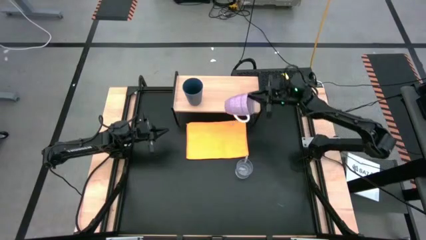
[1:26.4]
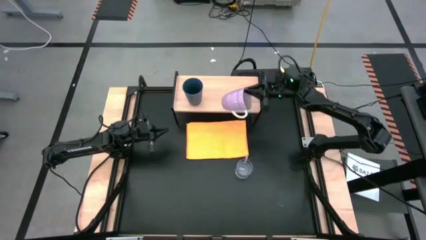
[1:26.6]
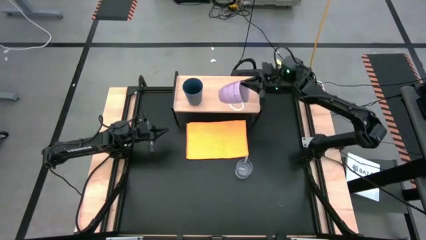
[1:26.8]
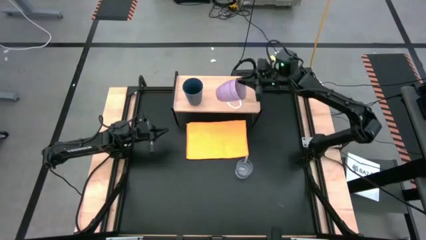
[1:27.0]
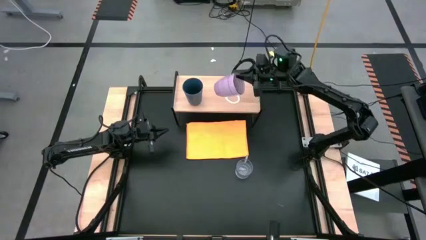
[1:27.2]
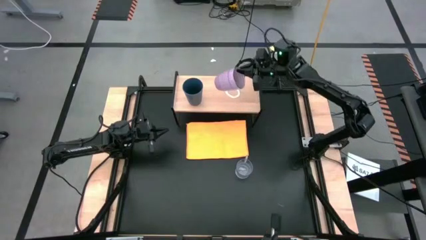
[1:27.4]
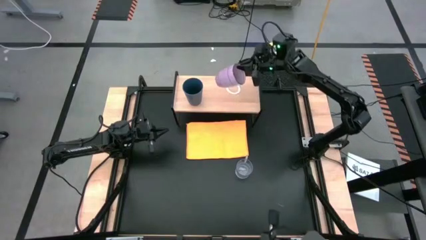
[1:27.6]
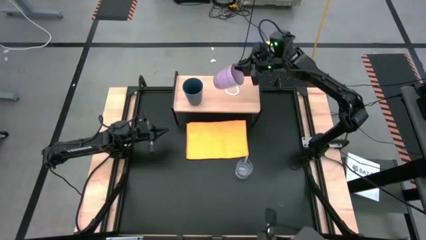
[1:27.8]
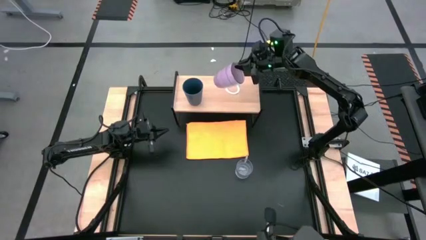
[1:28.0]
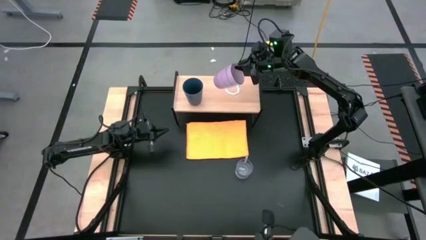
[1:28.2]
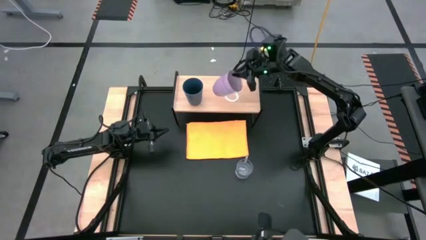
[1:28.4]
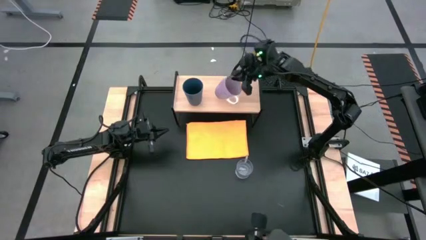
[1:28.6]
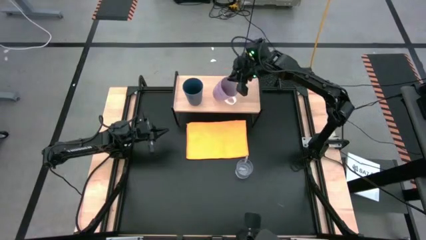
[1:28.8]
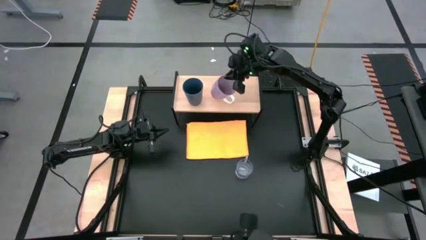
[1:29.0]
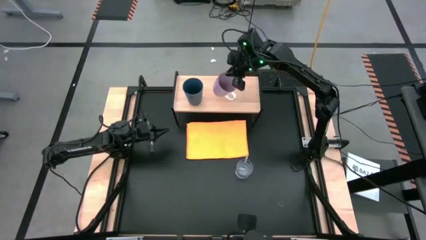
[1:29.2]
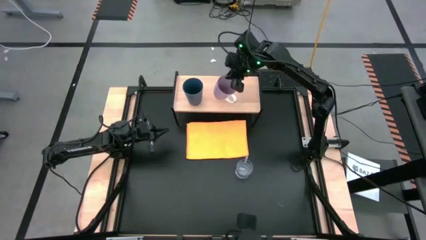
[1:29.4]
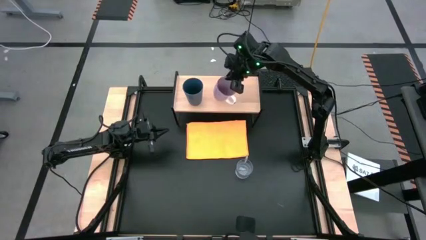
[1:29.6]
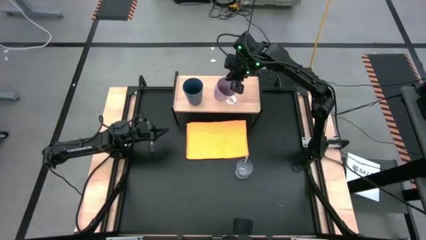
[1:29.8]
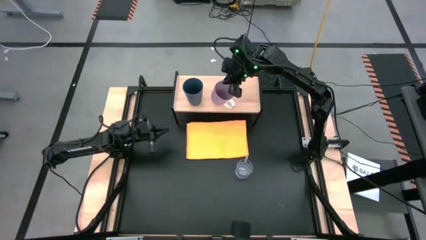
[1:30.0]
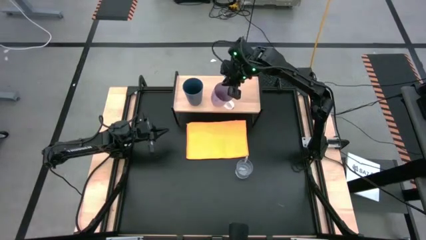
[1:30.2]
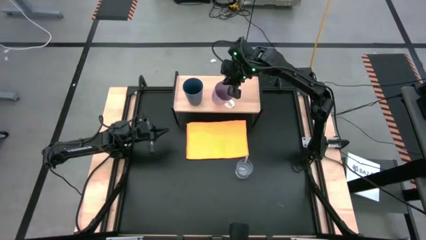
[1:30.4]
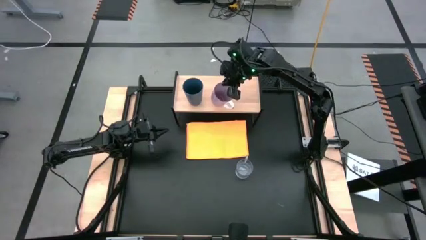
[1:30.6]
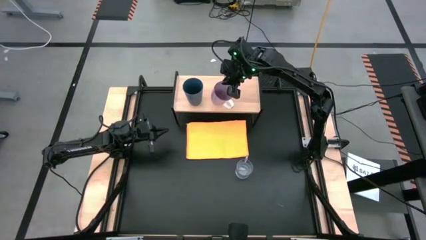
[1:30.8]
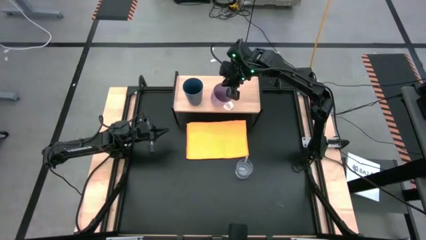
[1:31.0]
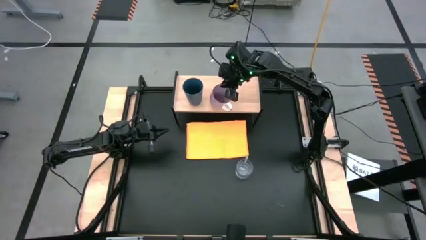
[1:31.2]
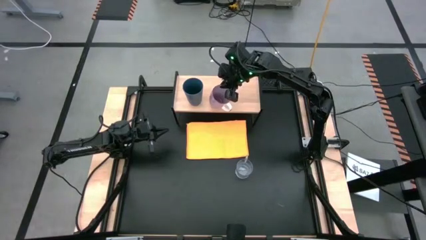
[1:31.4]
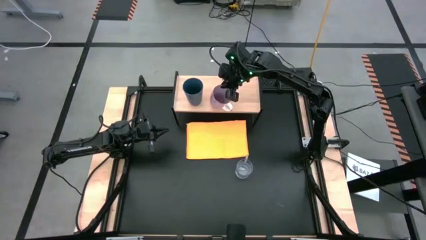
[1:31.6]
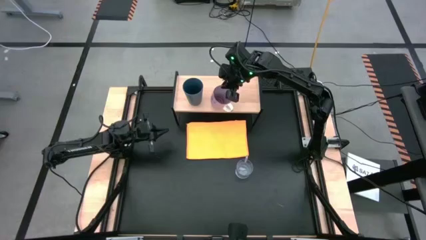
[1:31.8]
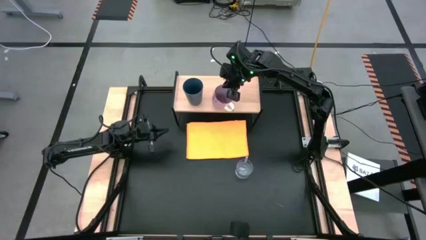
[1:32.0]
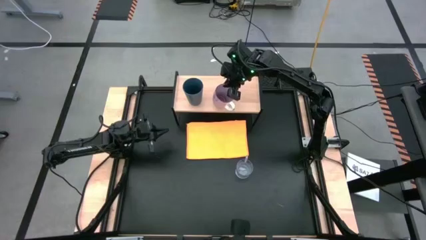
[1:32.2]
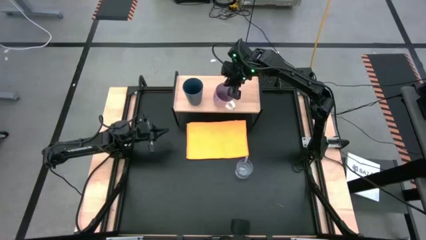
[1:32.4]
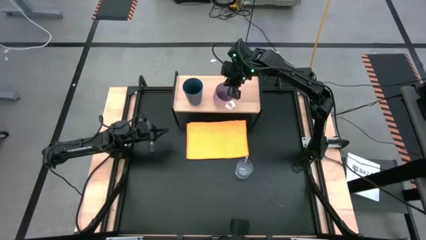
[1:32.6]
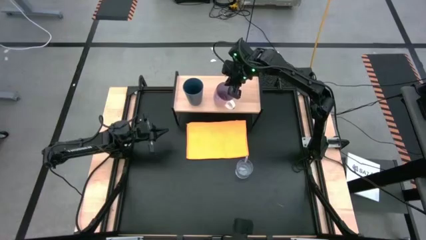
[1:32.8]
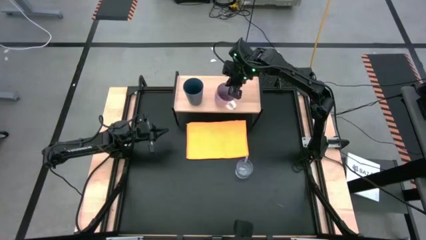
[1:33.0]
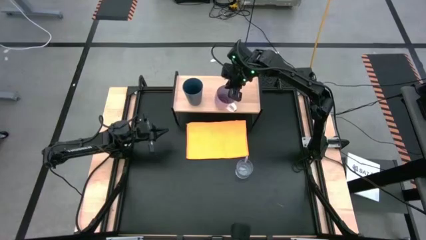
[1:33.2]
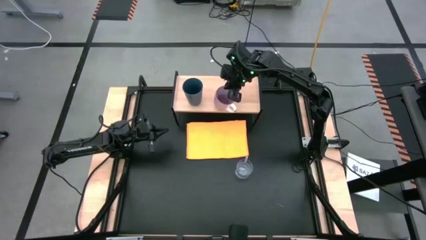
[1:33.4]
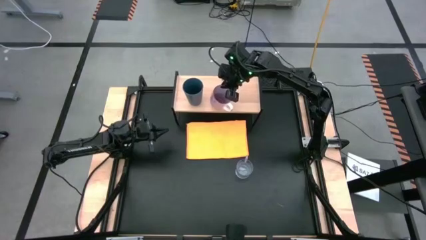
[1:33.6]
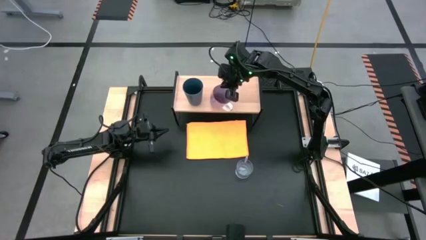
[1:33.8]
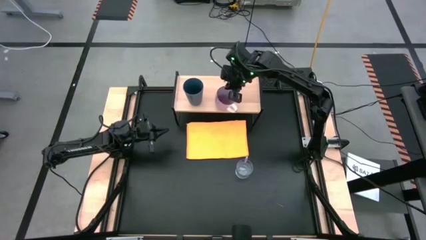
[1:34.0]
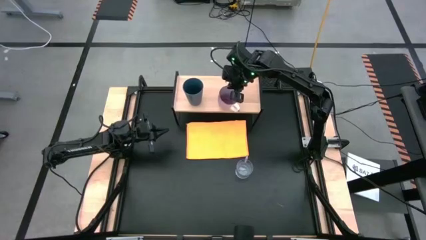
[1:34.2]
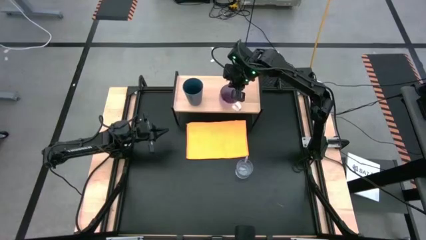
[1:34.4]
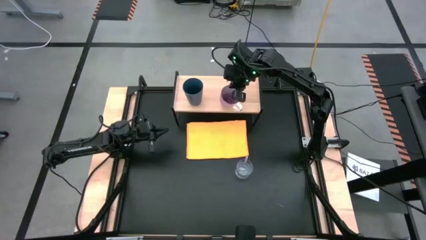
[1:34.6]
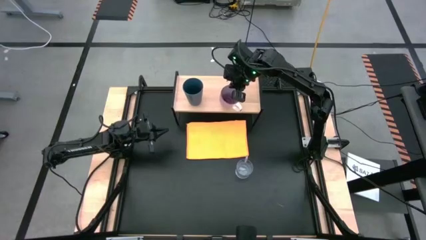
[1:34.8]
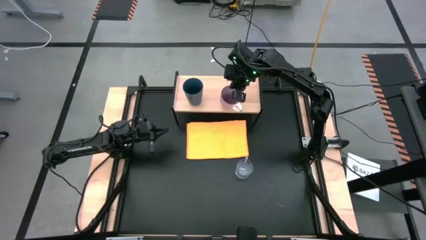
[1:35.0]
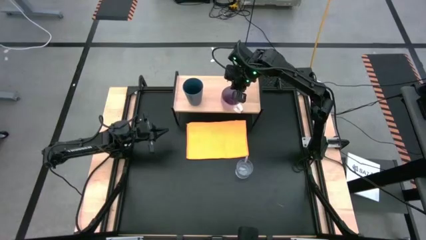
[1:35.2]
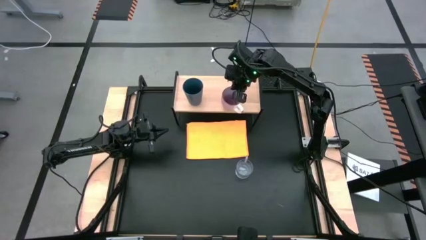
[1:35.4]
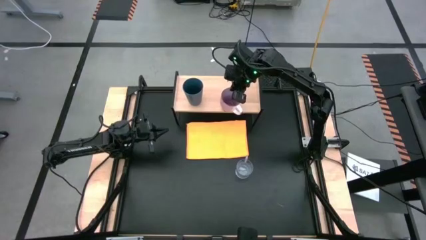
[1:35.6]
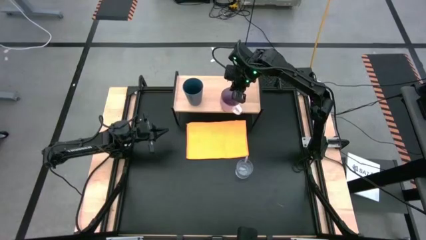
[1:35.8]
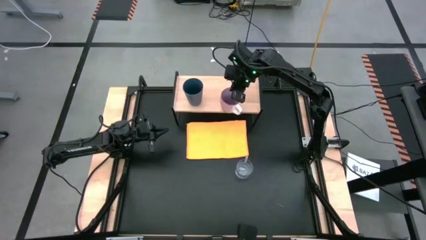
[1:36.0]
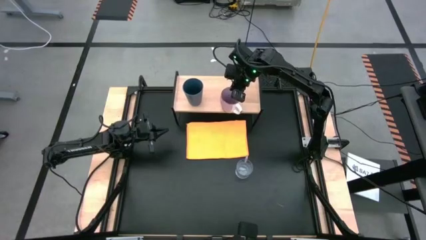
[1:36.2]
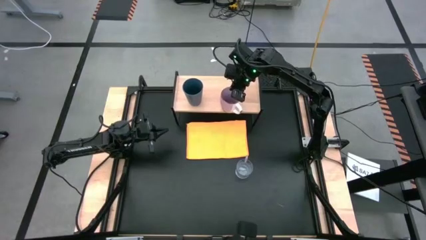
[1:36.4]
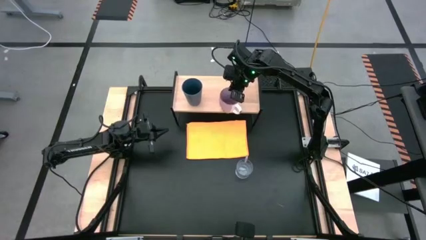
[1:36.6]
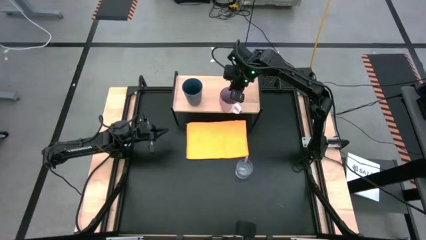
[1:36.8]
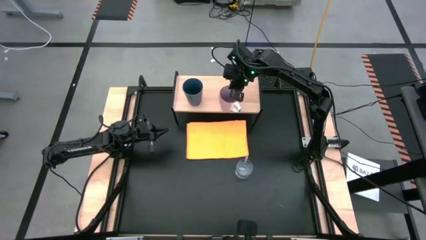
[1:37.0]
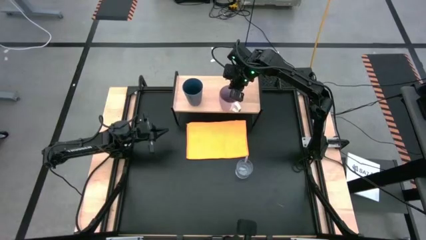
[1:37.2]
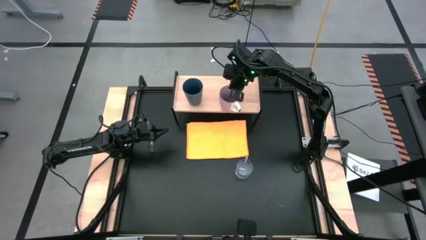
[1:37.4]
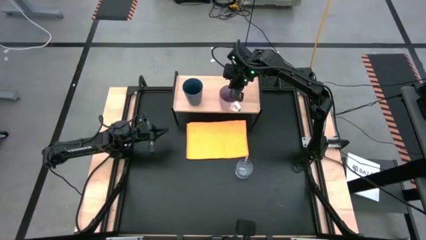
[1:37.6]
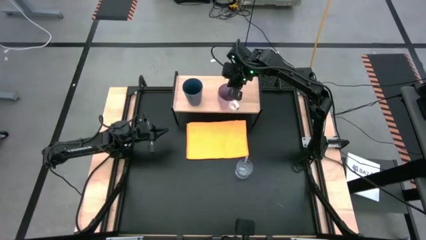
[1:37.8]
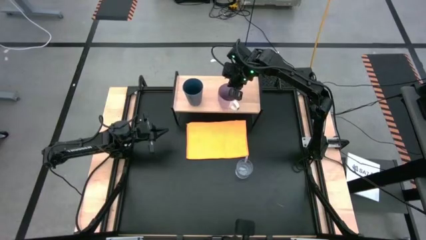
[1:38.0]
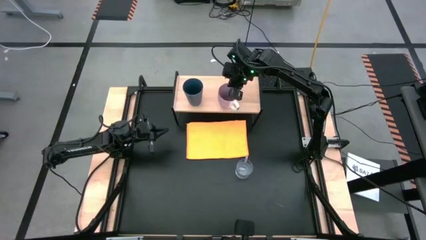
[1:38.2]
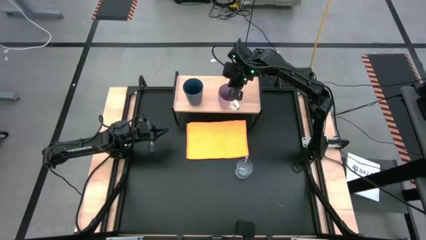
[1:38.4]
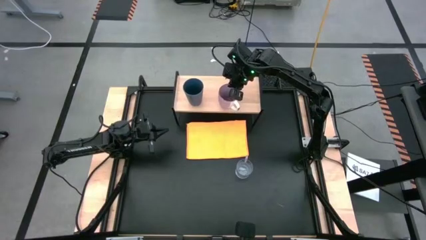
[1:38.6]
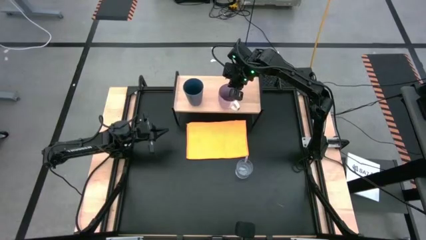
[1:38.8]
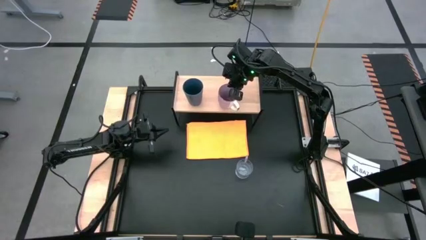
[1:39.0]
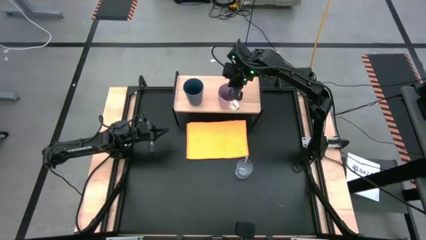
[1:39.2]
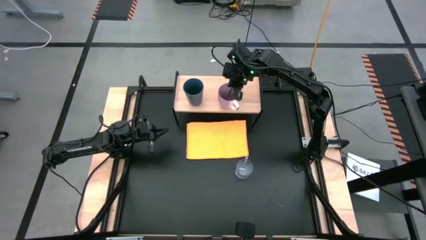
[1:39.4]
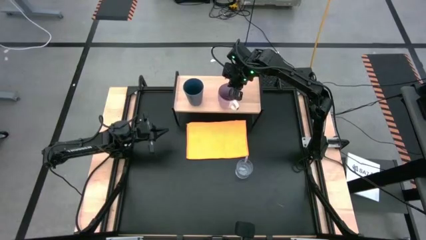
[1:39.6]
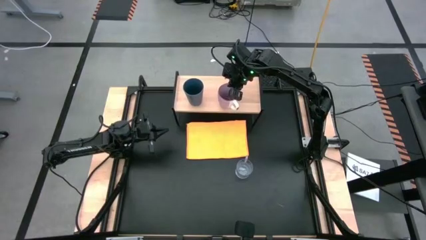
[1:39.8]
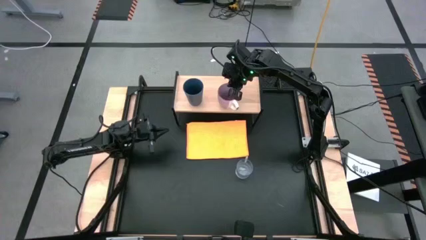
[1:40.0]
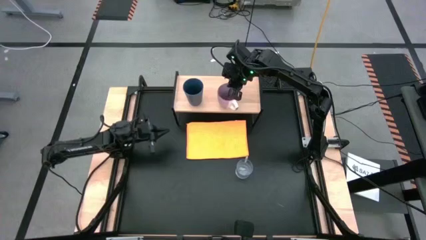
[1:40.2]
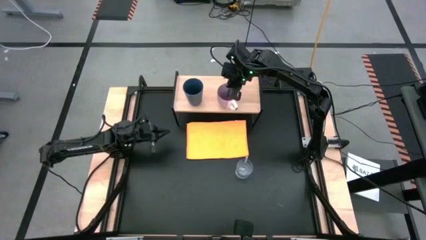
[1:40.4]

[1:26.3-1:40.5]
Task: Stack small to large cups/mugs on shelf
Put the purple mug on the shelf

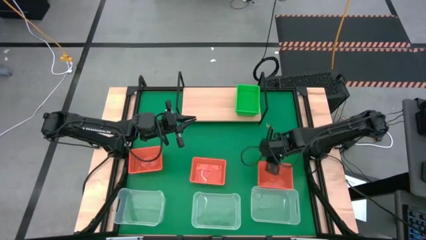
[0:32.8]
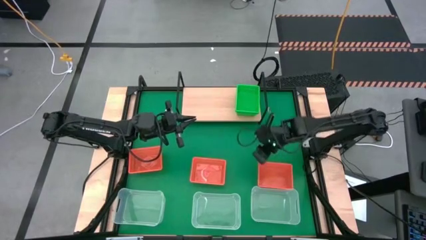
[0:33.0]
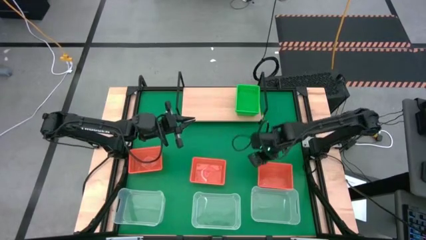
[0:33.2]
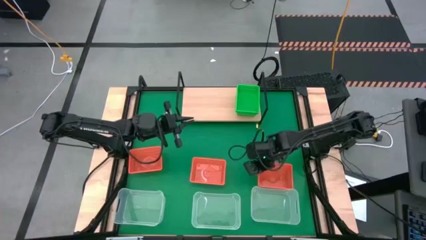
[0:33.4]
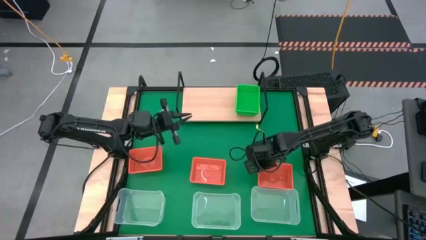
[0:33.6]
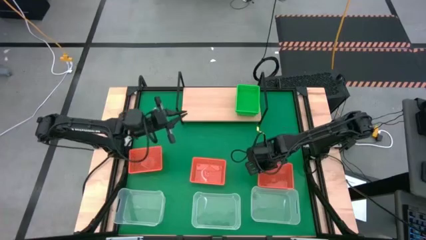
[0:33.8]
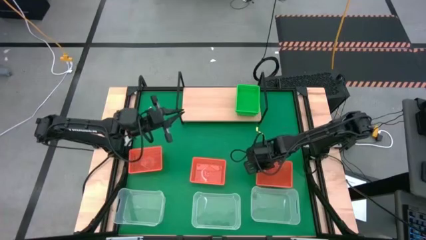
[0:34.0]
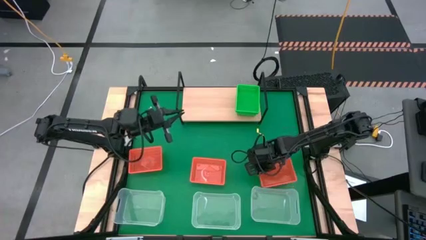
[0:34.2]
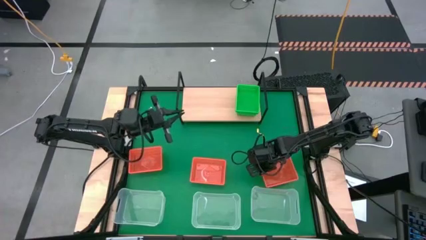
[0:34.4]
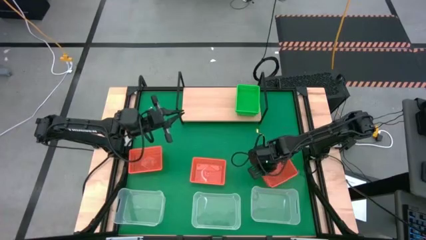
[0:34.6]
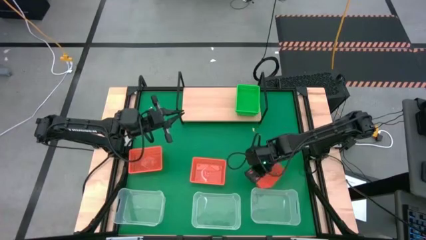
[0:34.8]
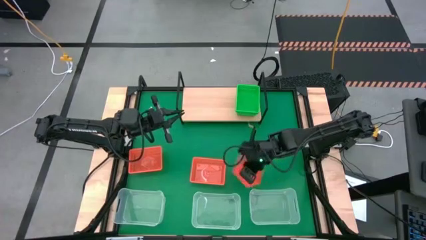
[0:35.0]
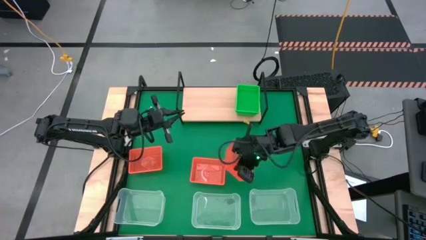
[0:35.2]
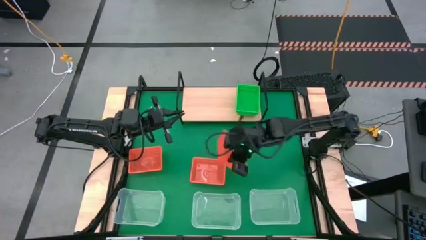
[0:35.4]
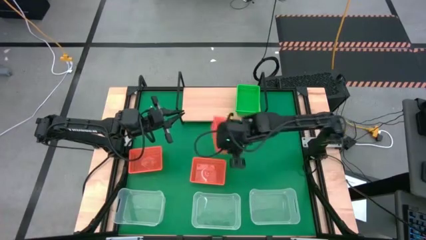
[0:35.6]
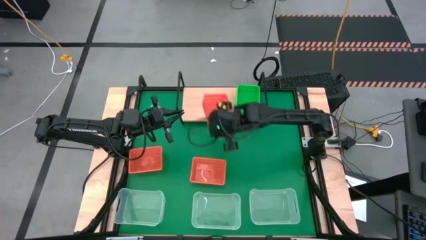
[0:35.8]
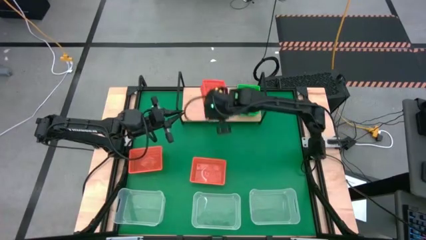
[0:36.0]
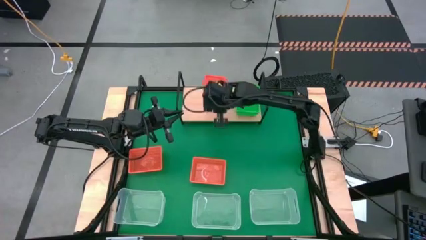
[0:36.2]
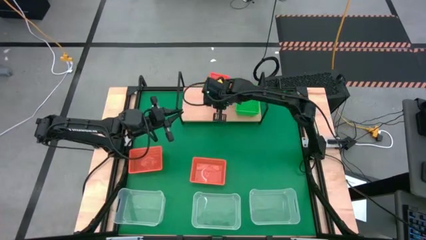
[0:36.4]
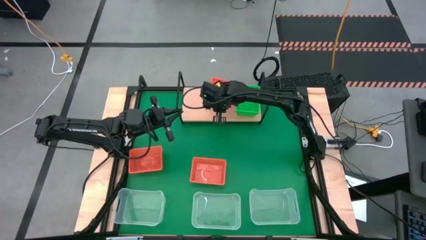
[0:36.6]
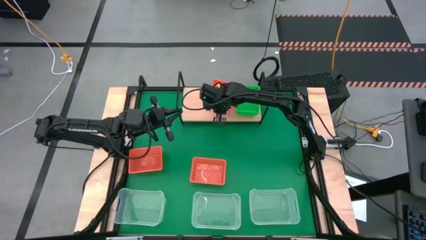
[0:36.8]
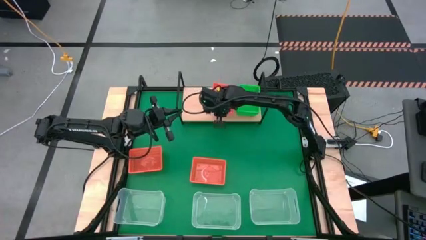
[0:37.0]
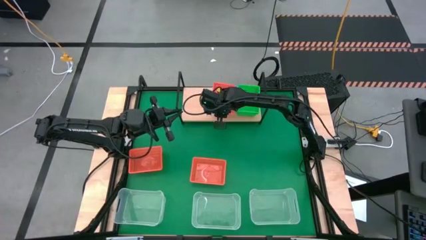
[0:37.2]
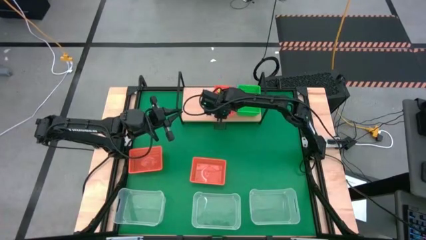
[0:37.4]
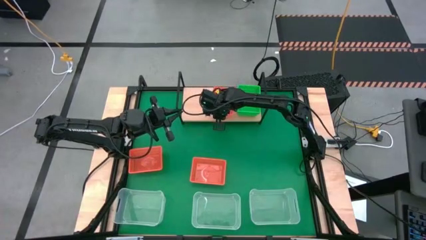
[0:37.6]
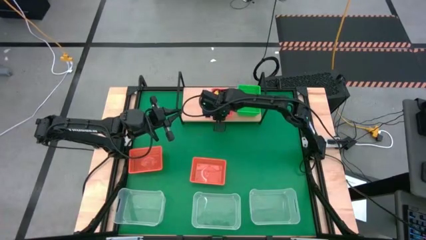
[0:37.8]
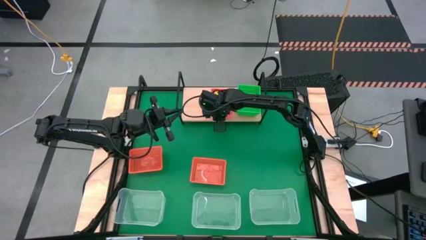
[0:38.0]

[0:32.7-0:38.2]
Task: Stack baskets on shelf by color
Put the right orange bin on the shelf
